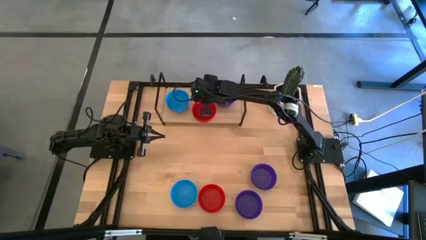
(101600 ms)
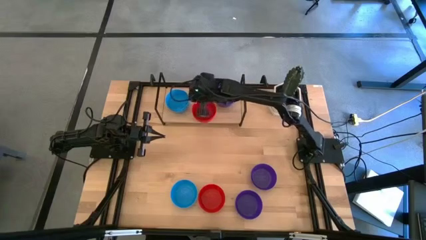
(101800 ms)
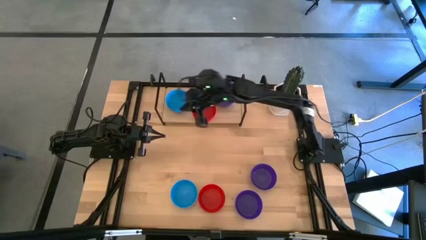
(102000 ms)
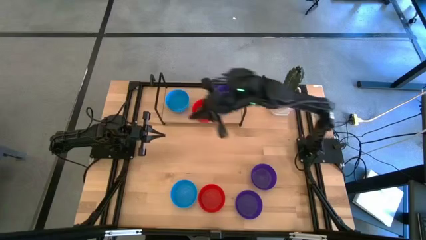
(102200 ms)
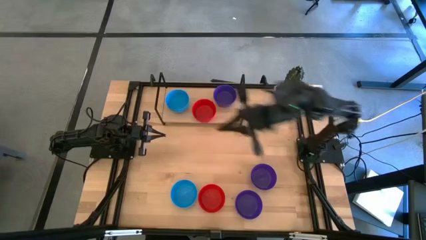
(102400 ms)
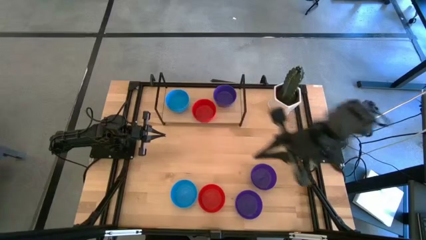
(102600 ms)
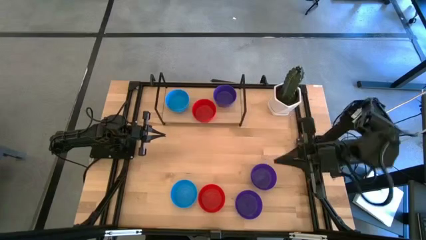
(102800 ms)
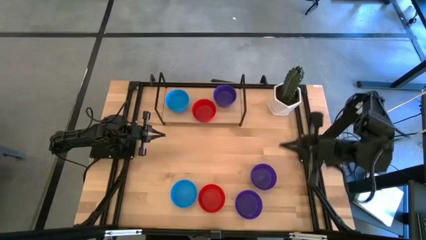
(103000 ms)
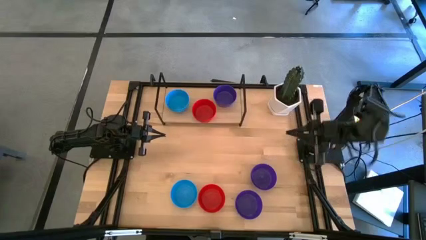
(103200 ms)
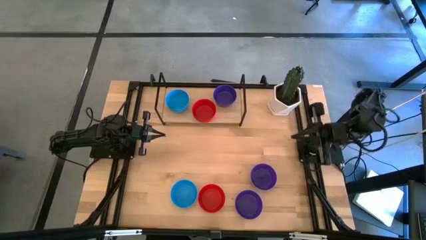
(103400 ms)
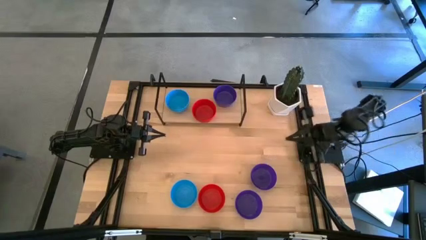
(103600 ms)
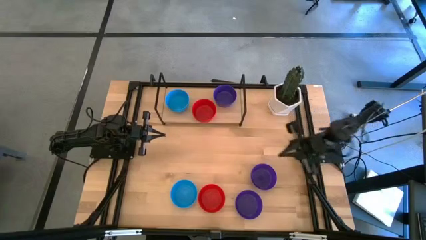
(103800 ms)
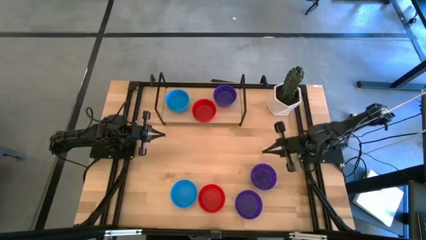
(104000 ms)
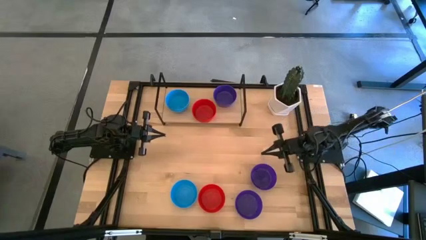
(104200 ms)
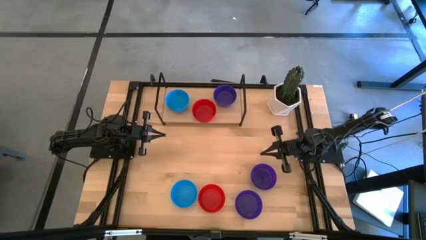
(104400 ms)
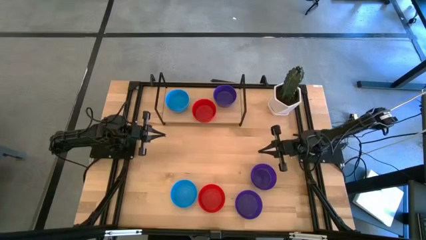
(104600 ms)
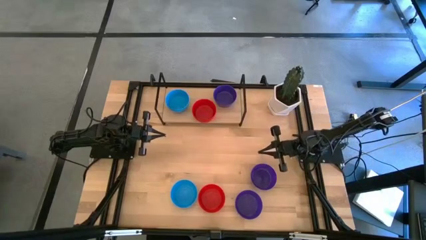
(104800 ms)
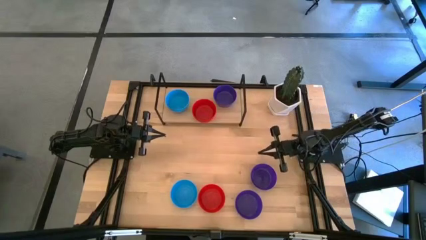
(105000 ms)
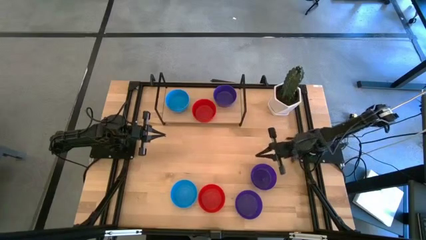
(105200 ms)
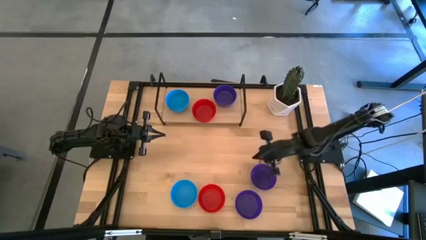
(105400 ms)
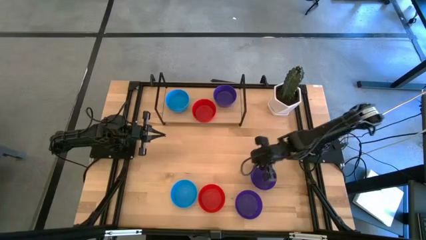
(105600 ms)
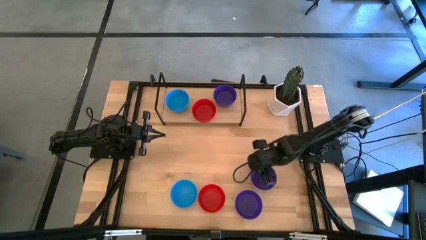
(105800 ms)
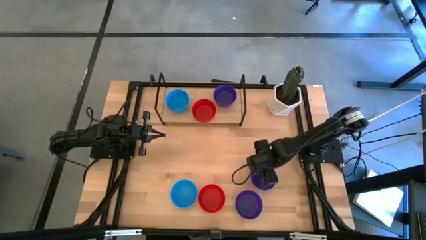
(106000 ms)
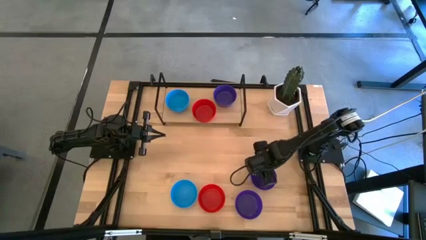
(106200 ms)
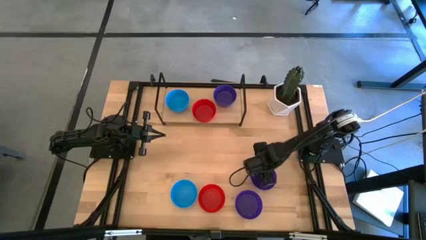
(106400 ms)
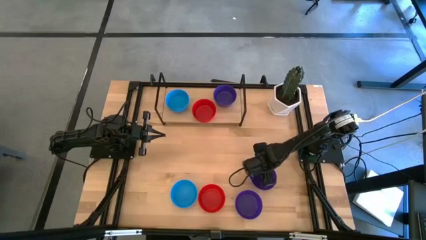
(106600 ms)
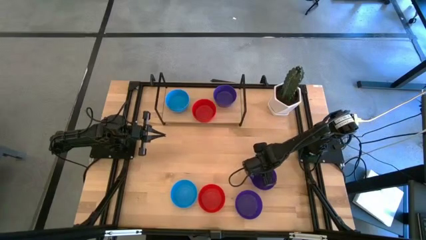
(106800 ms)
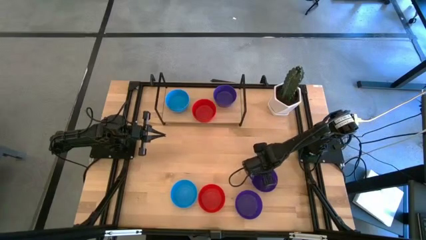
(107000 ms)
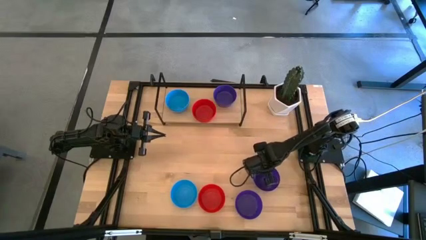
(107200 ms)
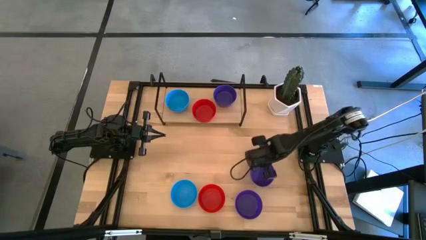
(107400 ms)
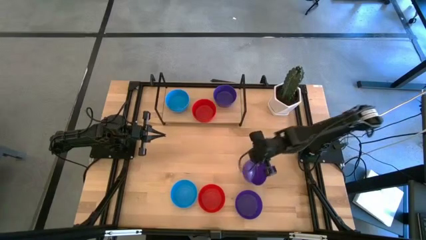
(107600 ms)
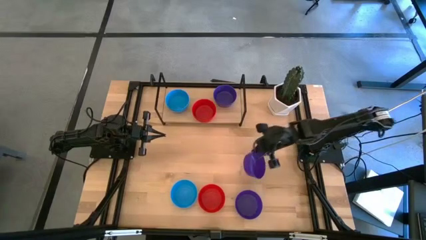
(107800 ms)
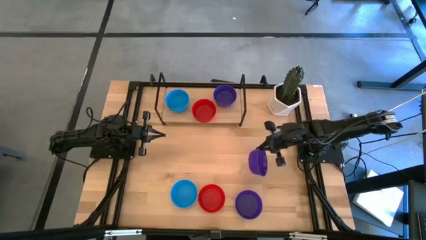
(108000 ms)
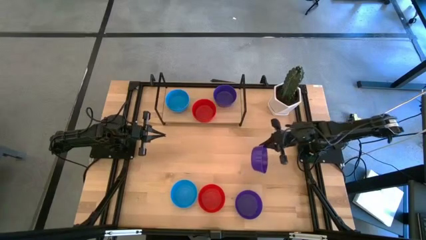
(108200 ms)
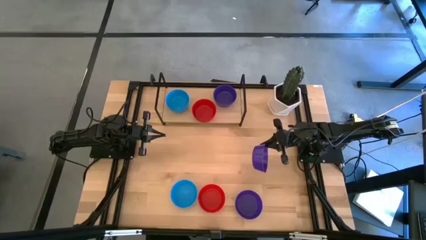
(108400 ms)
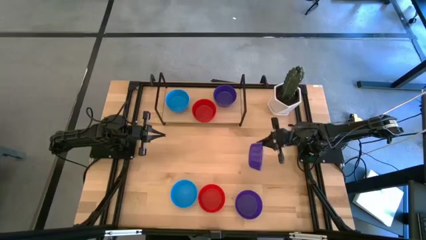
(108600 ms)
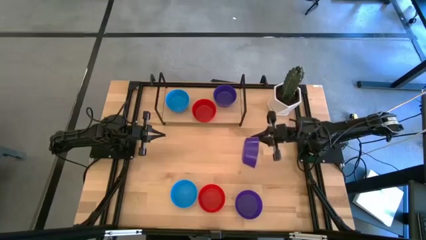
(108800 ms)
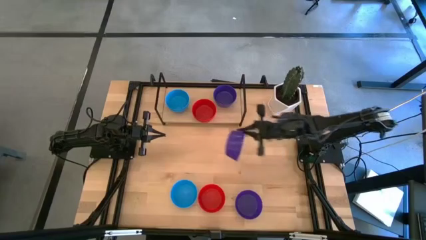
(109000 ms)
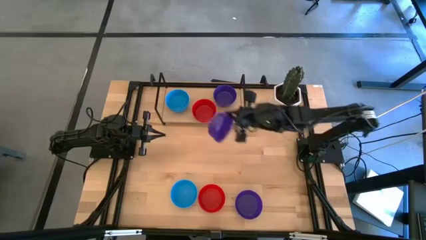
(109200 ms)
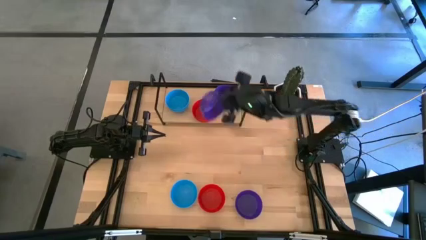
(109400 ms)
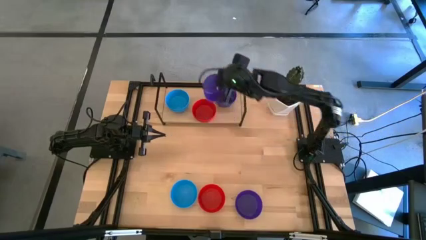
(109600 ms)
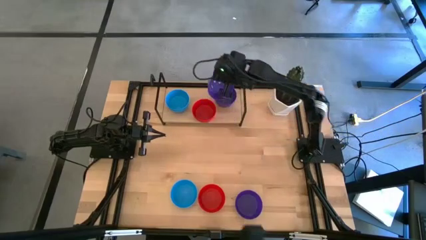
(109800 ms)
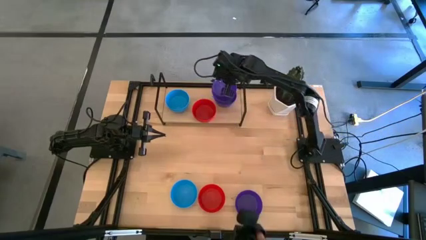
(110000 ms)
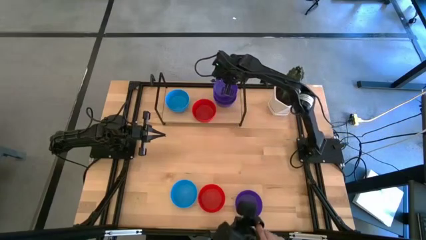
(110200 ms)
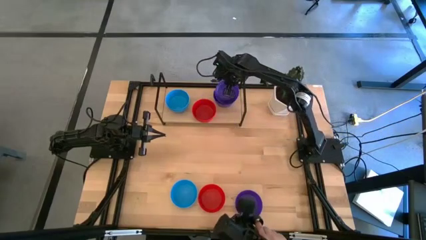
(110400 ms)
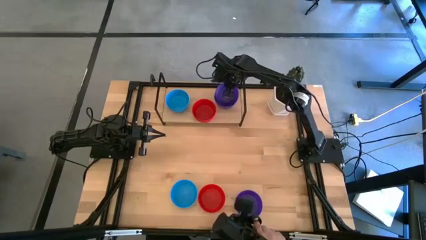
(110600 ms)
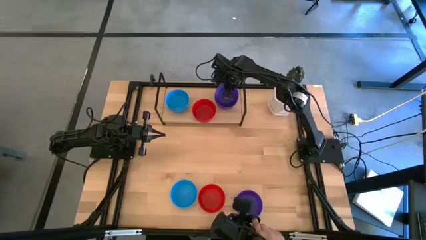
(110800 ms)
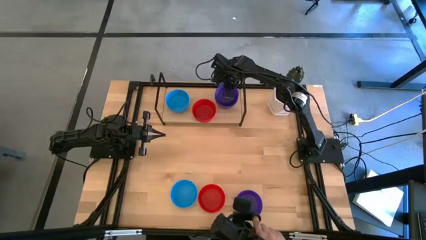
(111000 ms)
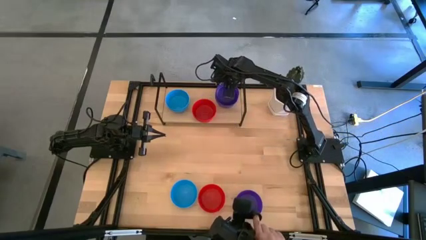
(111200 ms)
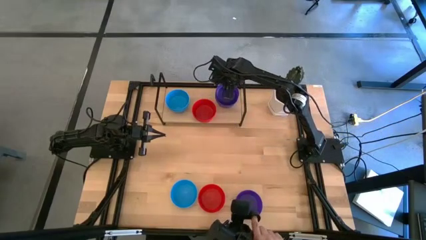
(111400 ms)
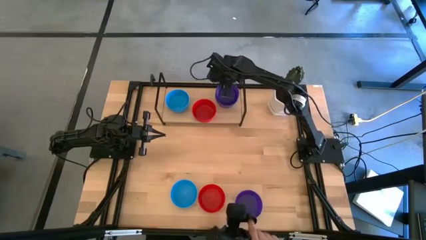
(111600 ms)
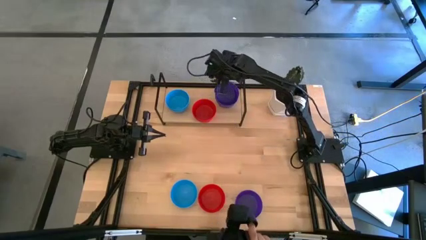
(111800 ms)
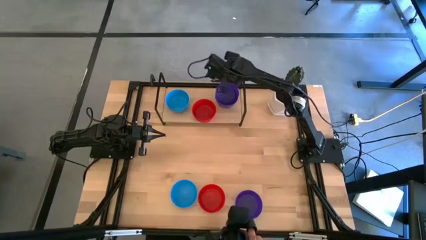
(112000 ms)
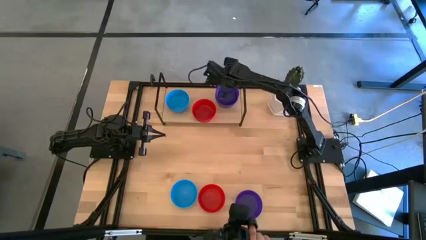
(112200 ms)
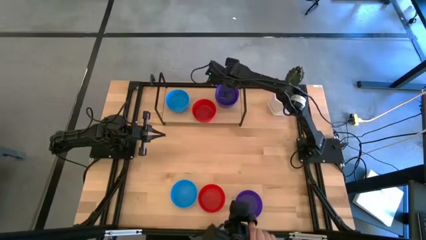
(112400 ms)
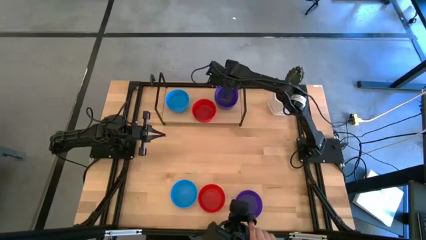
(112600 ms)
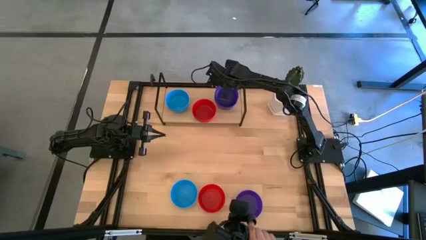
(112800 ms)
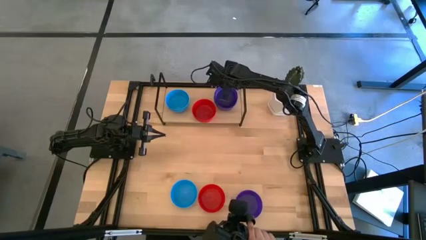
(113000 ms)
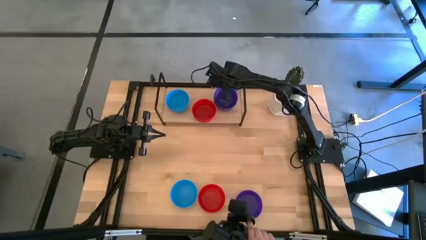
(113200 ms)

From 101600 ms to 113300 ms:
Task: Pick & Place Mini bowls
Stack the violet bowl on top of the violet bowls on the shelf

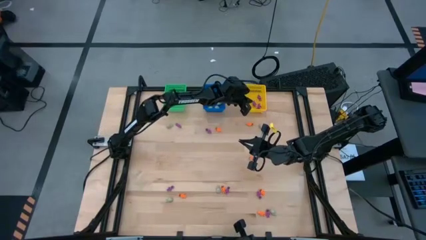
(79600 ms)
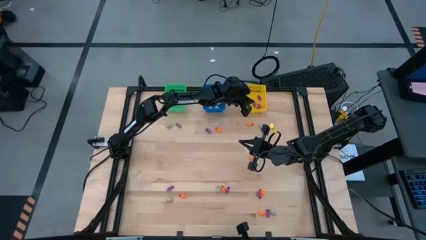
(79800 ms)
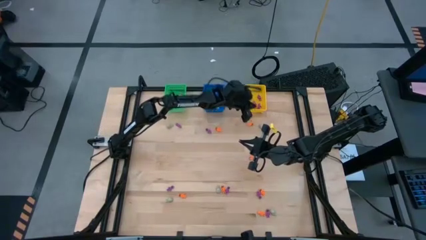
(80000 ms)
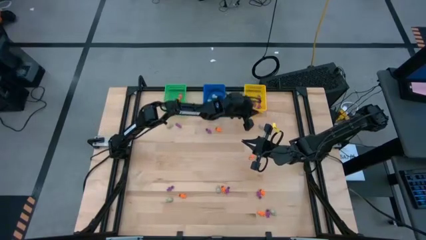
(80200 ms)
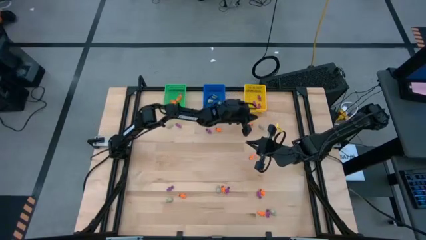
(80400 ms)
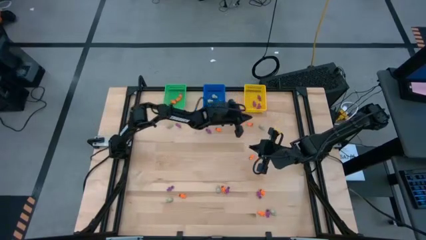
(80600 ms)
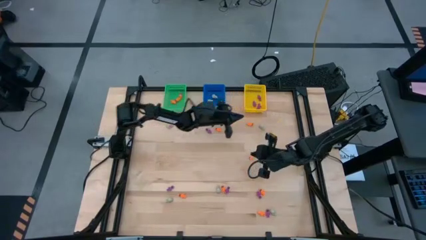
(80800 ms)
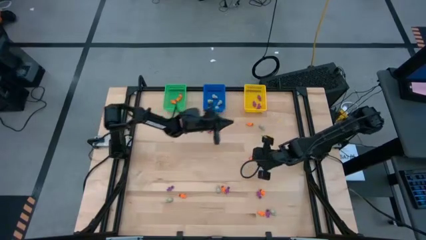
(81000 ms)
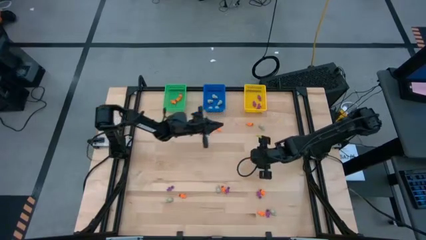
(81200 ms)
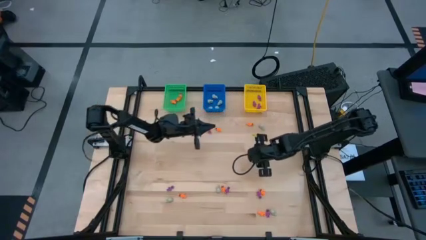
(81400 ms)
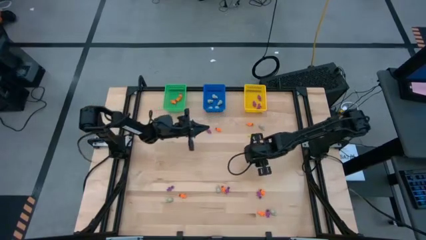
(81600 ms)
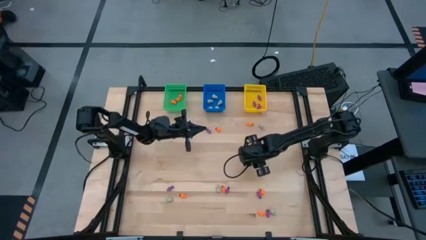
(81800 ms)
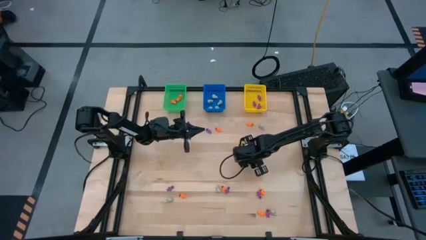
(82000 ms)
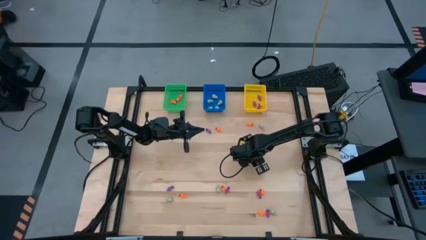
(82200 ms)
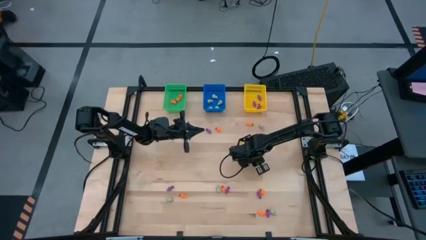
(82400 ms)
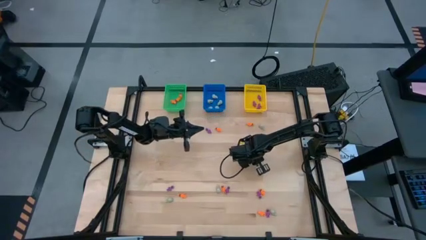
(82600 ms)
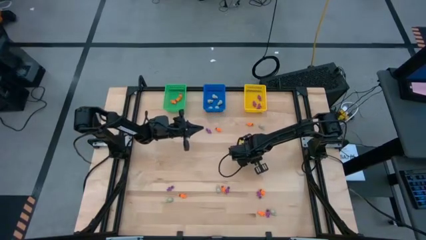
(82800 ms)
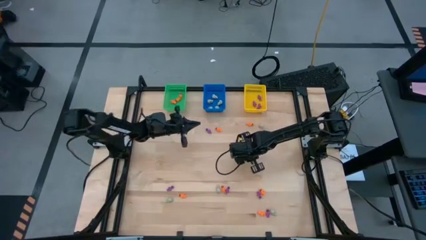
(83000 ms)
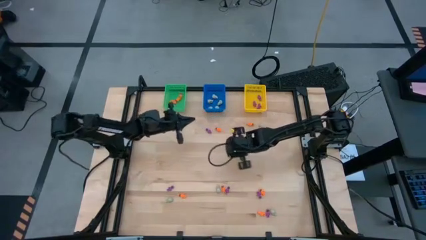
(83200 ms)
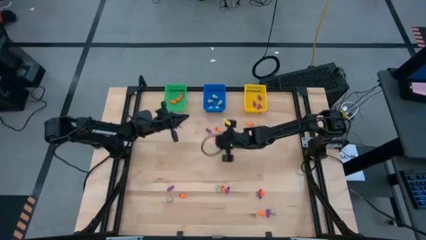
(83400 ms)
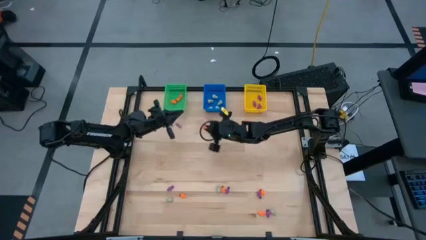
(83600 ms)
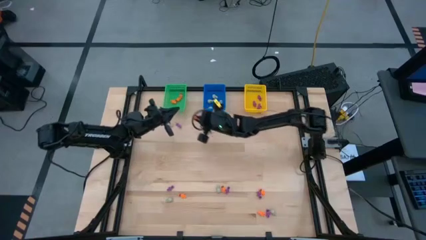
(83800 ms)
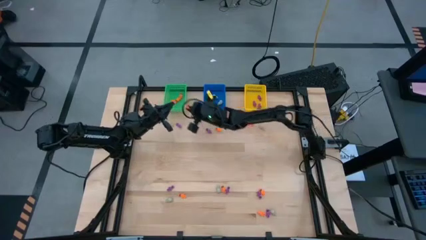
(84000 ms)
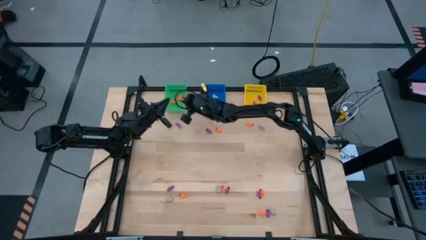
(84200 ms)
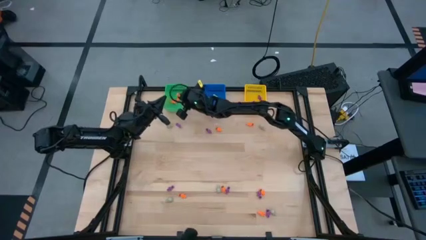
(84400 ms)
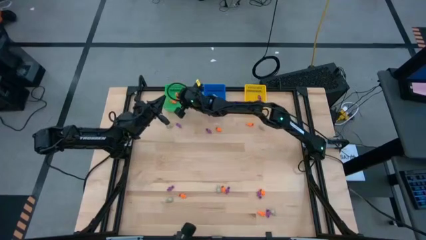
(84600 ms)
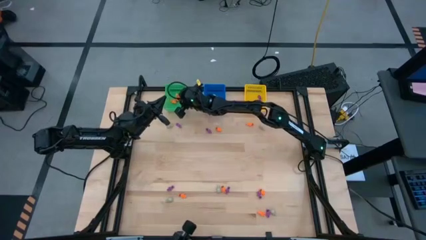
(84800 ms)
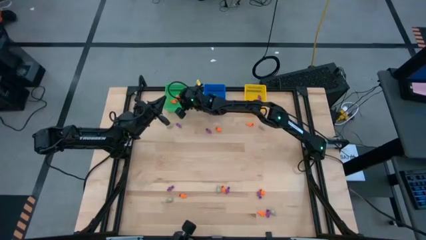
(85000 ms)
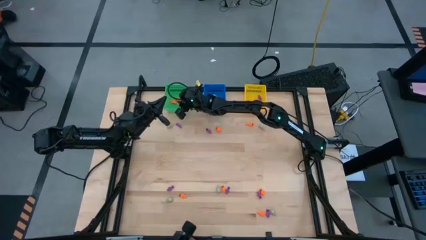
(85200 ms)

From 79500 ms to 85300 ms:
Task: Sort Halloween decoration
Put the orange skeleton toy into the green bin
